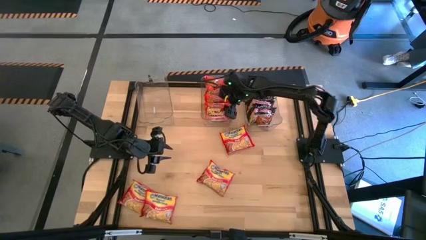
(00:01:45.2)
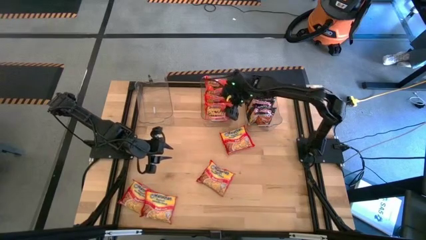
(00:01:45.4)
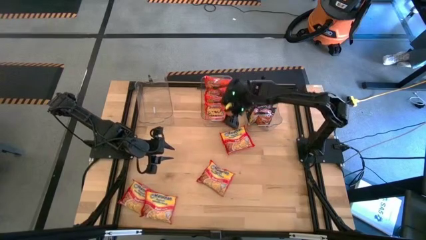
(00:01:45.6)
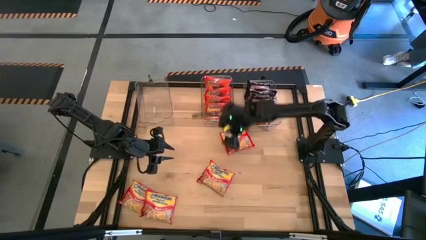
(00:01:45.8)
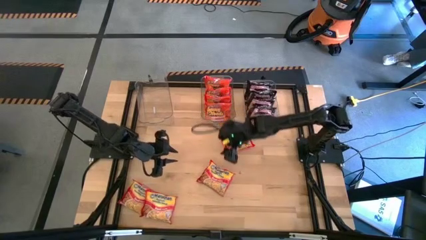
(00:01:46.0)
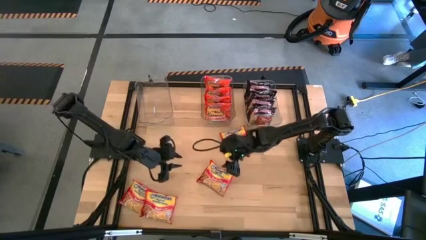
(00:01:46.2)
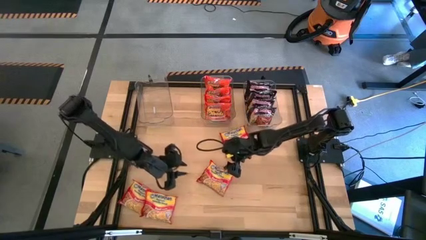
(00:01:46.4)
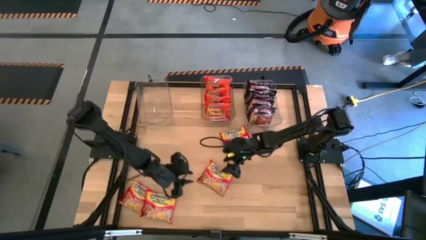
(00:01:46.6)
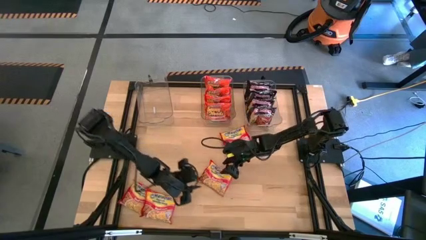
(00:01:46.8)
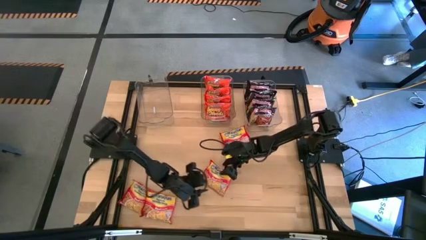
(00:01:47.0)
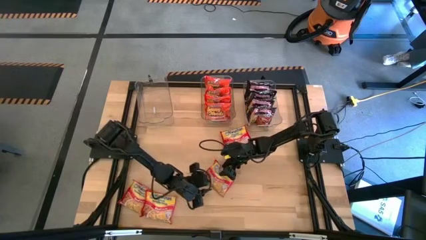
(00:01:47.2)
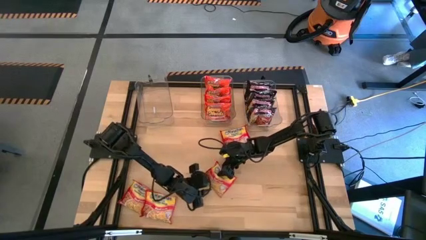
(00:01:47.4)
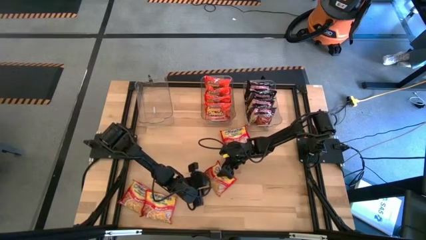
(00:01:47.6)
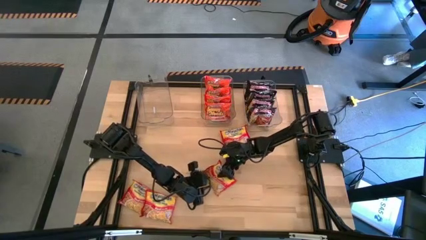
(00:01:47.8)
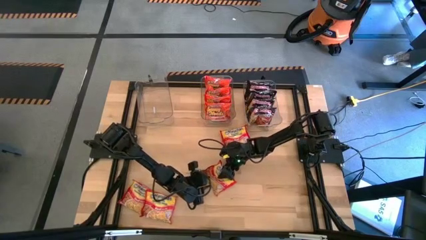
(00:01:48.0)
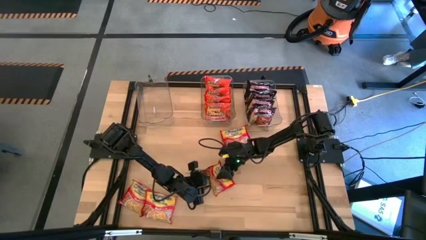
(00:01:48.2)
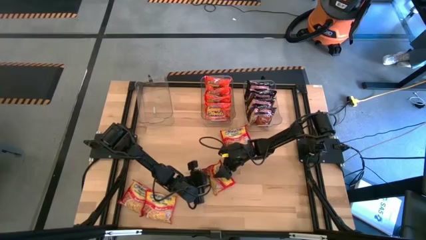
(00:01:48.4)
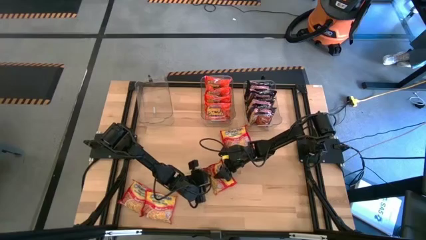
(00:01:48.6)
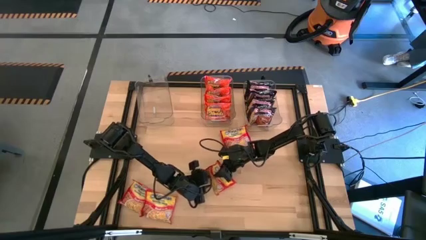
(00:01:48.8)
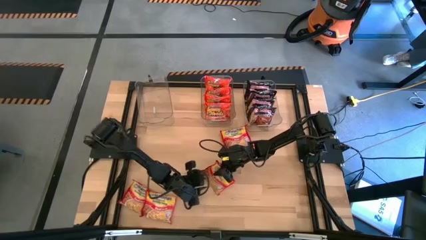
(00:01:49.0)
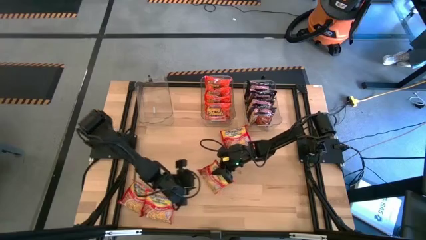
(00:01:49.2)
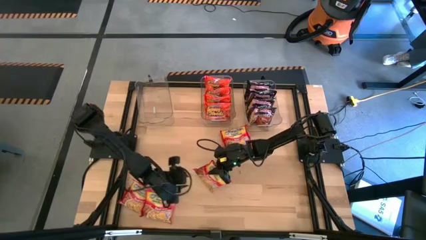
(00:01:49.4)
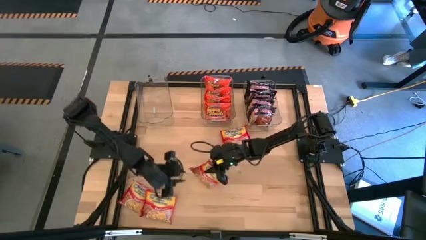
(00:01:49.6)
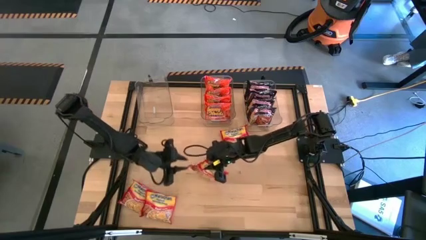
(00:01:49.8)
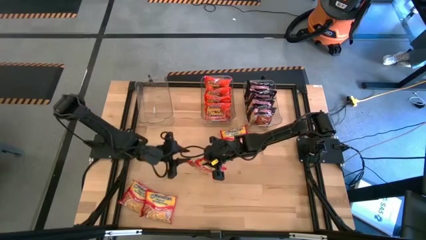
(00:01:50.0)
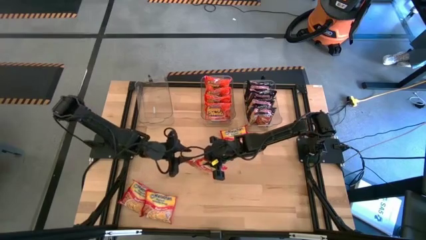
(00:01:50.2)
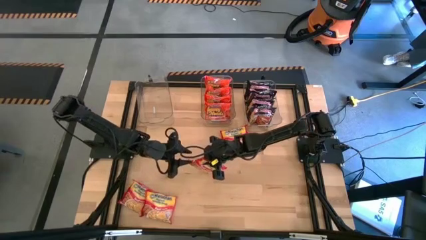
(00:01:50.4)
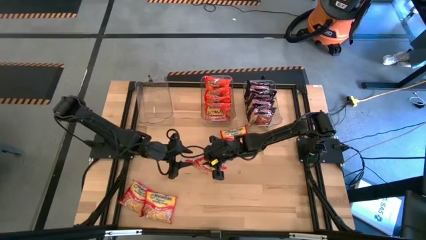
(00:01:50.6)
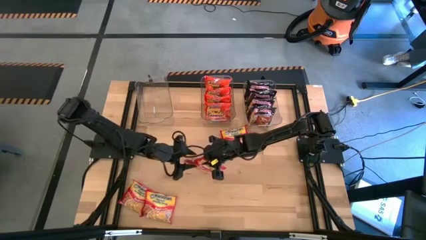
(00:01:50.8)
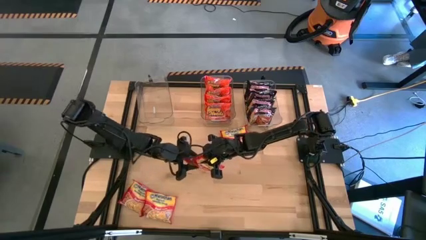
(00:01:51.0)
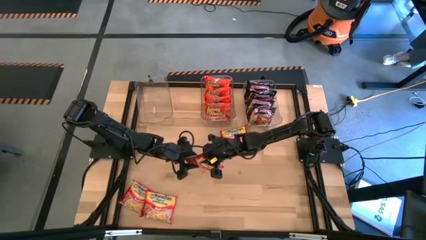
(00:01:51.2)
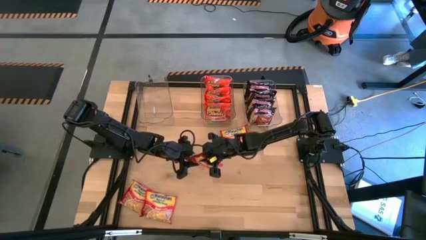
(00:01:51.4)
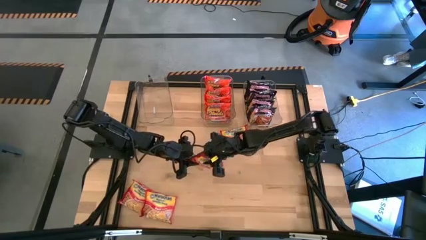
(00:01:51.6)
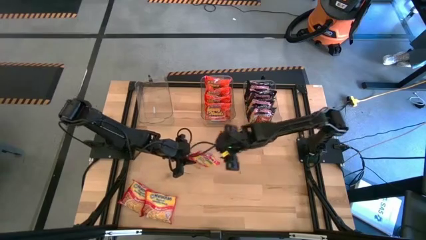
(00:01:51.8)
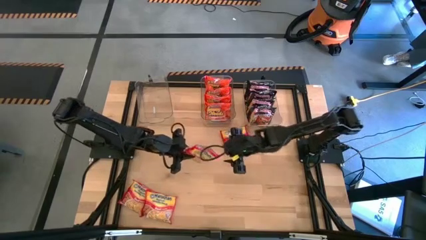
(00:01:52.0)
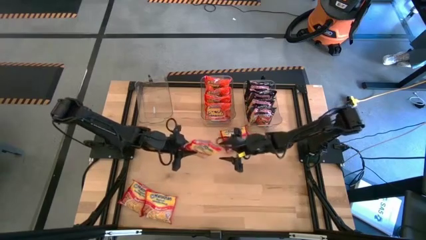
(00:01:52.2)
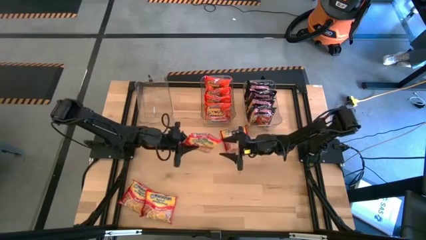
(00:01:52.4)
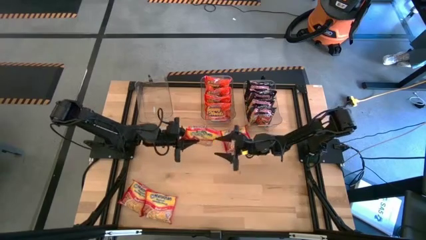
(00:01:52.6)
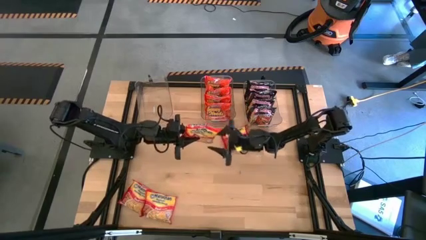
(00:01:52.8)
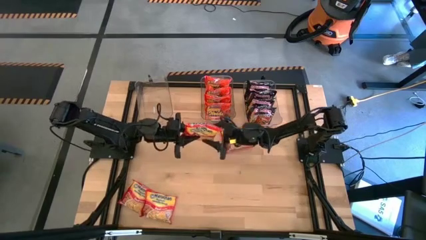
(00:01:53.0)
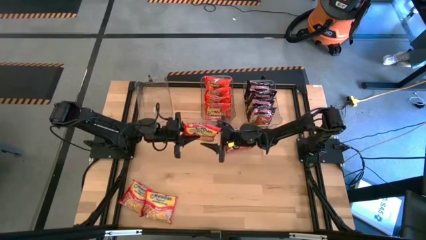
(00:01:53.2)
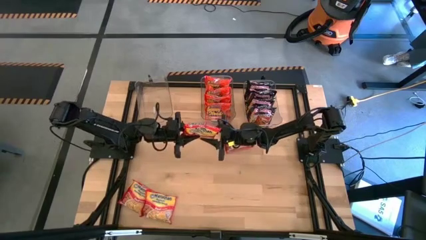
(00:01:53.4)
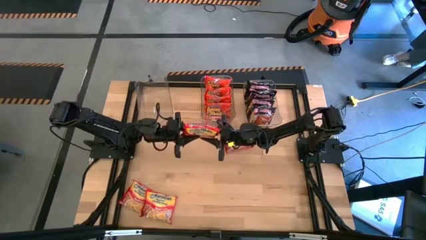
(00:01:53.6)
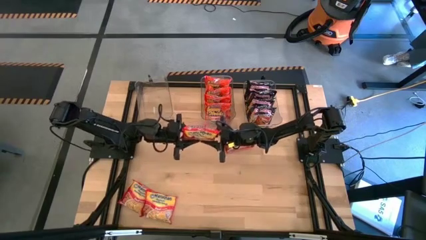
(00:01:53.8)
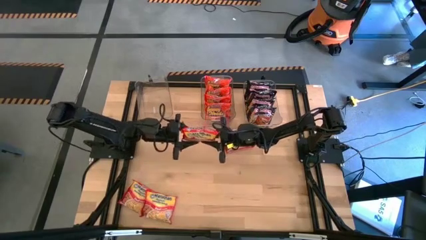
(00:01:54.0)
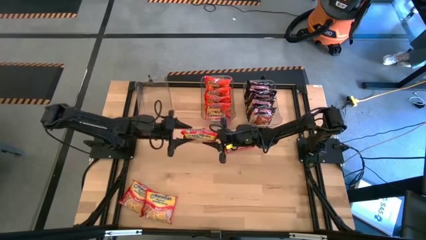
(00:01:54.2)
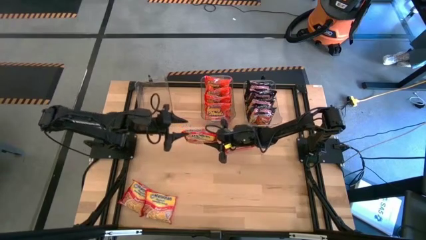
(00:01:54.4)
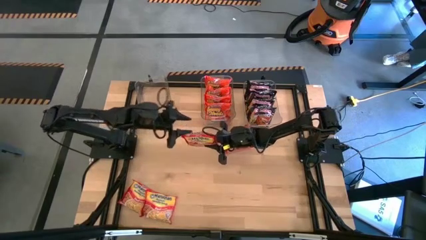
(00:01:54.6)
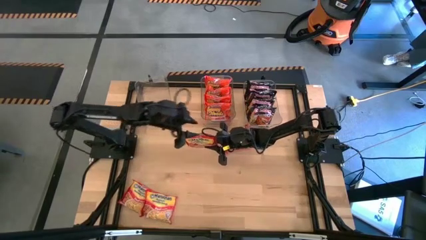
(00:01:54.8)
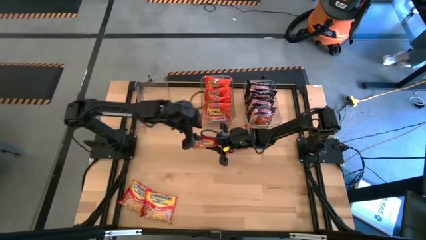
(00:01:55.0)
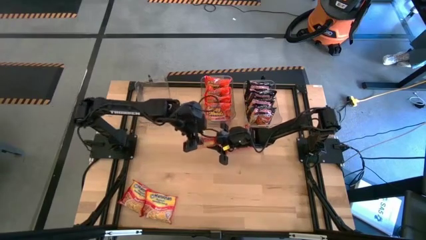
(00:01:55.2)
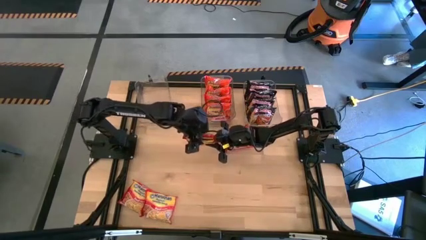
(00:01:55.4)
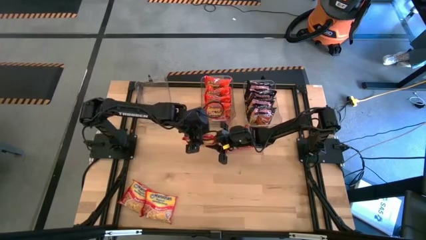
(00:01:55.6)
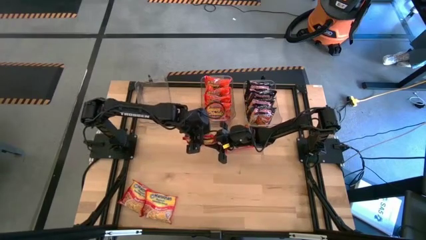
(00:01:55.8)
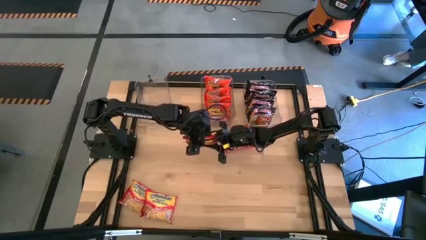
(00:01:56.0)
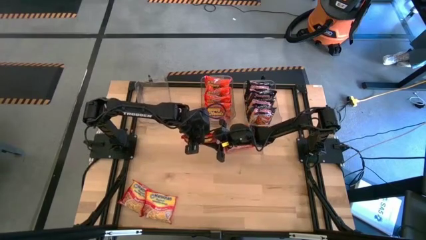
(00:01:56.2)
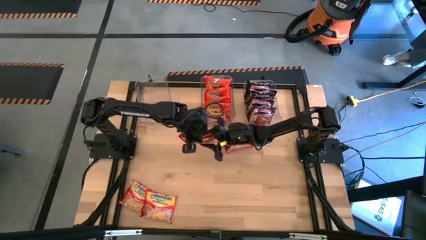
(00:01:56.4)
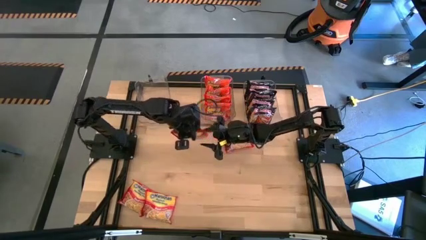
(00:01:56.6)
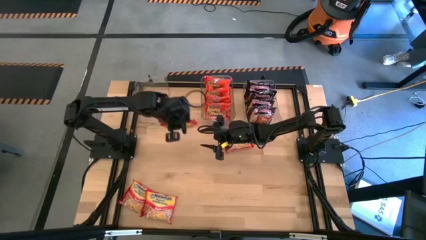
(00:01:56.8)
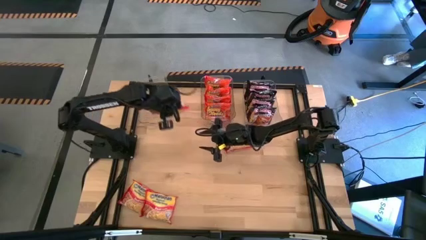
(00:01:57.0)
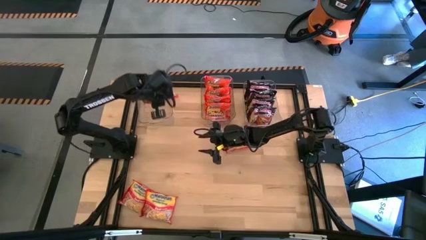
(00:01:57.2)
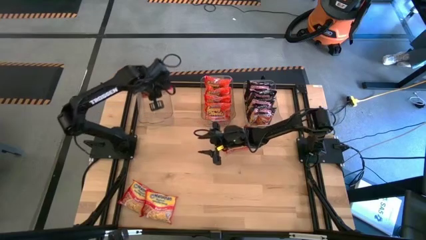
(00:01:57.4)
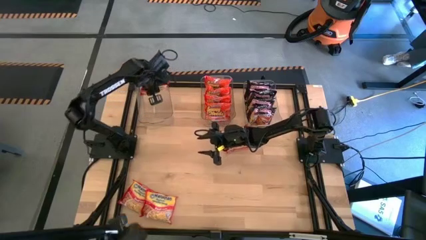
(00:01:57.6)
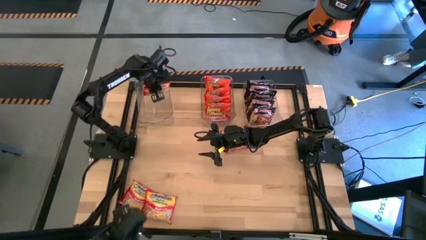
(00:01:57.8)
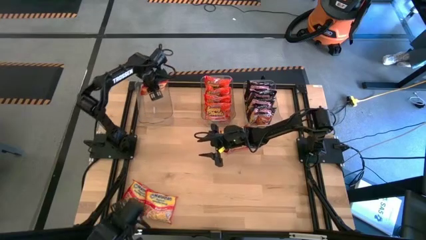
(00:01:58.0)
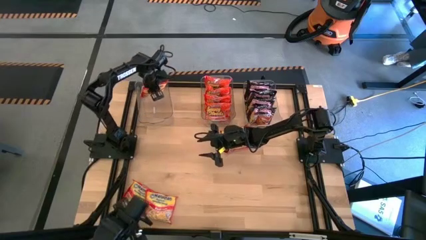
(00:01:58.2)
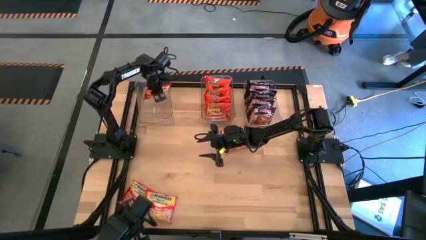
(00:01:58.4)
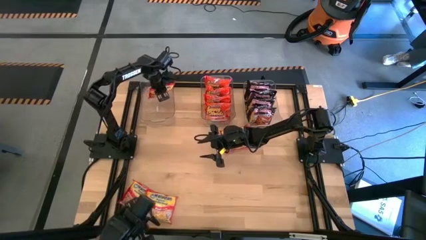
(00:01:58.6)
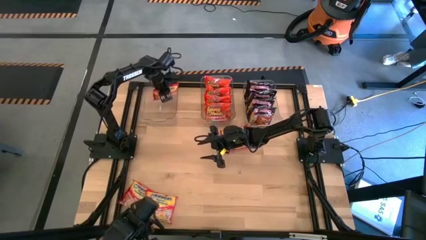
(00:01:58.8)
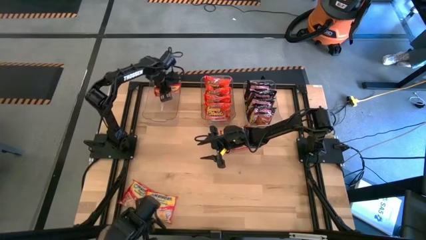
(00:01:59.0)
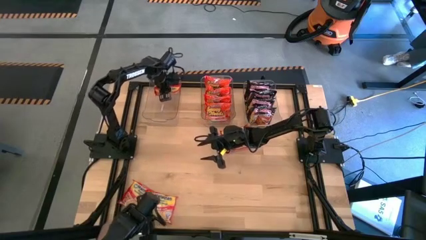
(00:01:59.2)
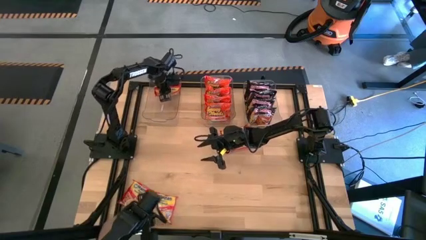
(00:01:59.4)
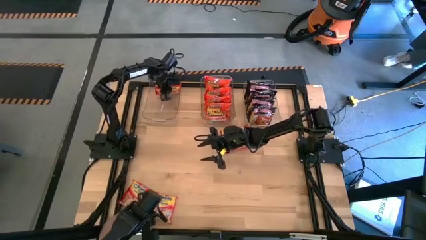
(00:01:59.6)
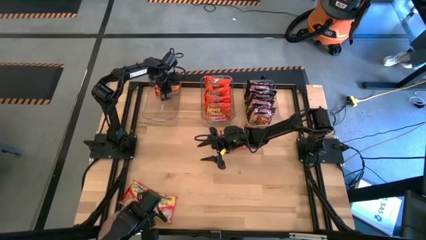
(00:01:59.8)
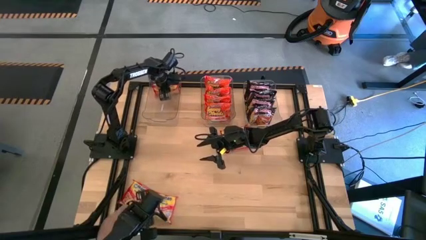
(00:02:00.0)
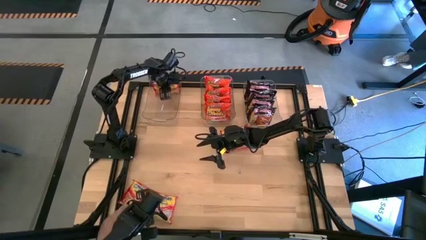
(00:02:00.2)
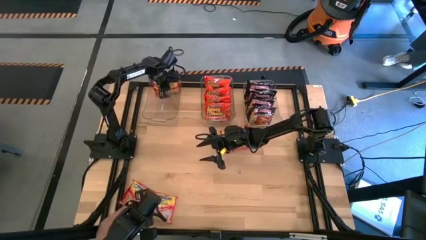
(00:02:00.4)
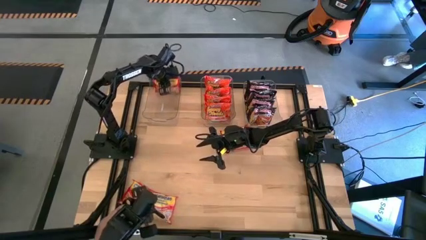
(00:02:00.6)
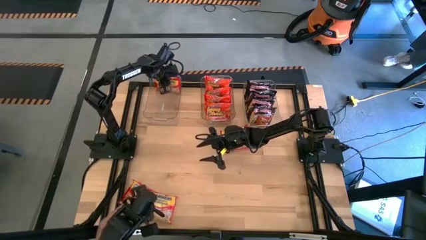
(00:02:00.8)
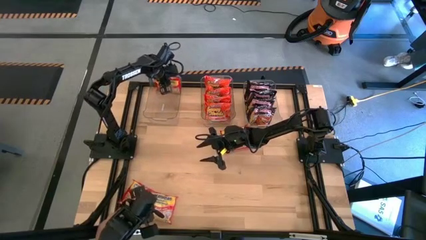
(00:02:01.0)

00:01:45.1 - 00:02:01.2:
Task: Sort Maruchan noodles
Put the red noodle pack into the left transparent bin
